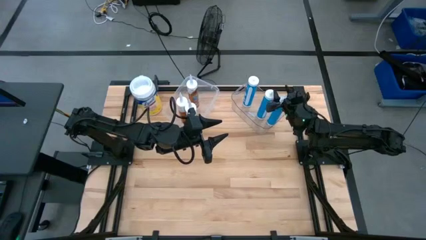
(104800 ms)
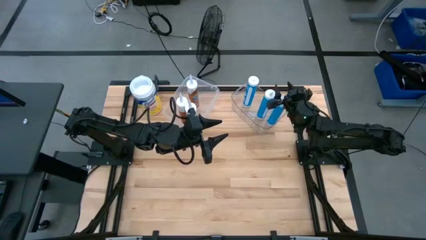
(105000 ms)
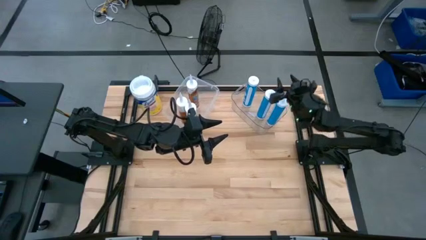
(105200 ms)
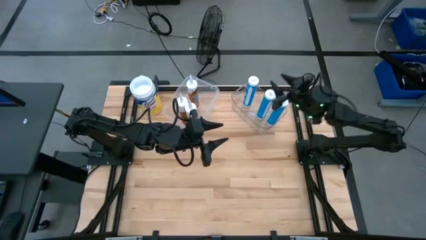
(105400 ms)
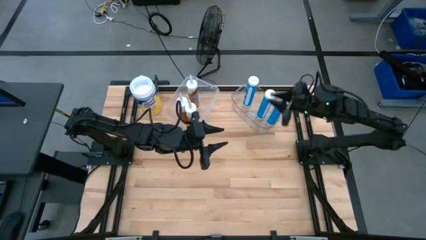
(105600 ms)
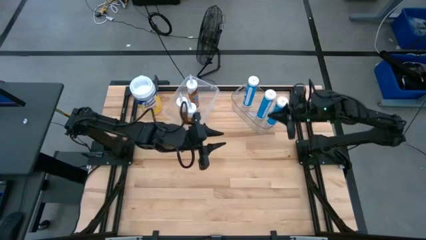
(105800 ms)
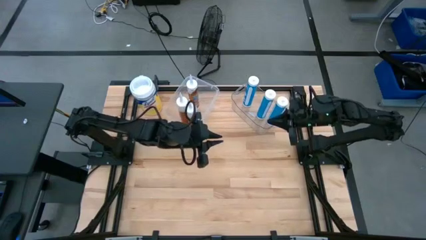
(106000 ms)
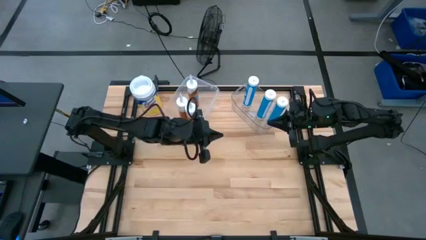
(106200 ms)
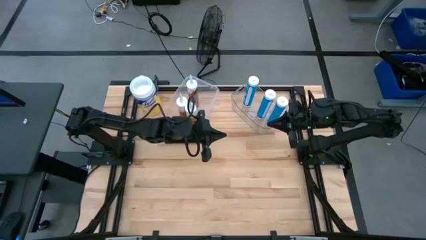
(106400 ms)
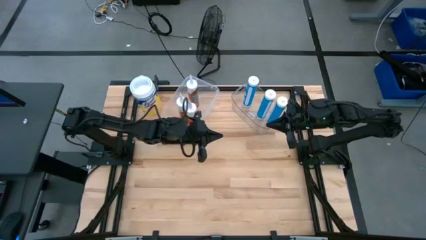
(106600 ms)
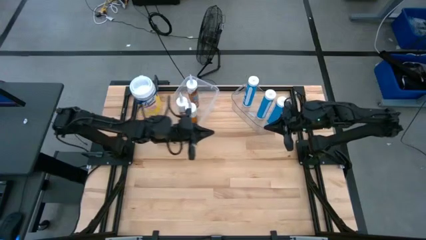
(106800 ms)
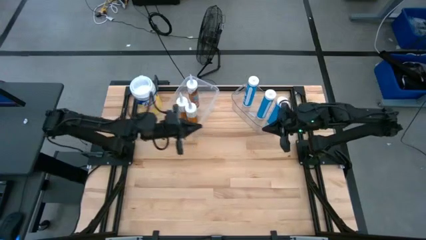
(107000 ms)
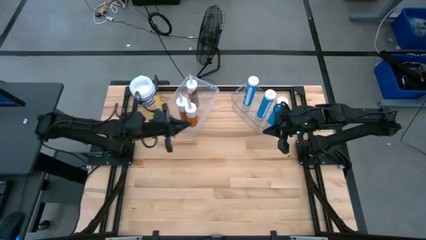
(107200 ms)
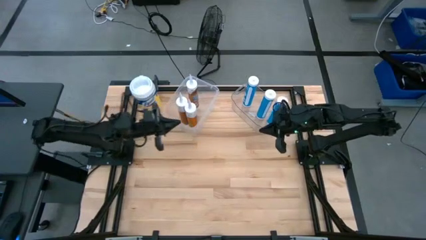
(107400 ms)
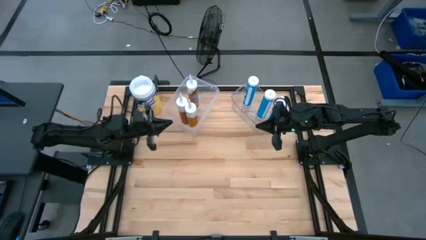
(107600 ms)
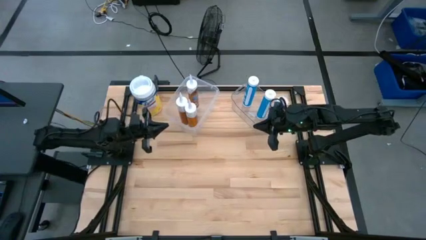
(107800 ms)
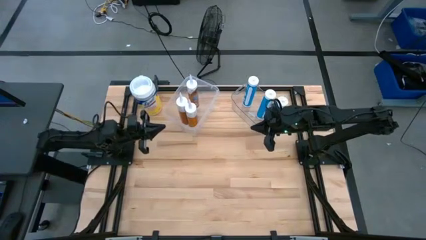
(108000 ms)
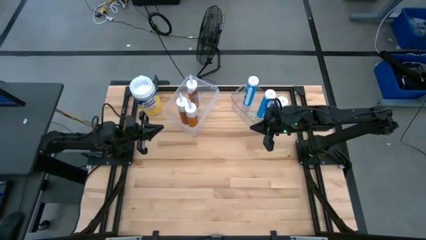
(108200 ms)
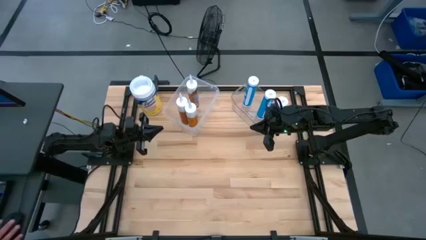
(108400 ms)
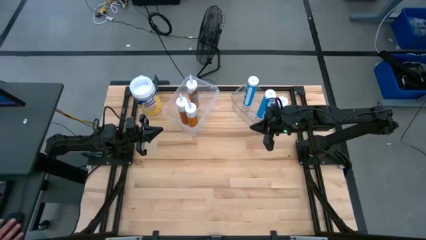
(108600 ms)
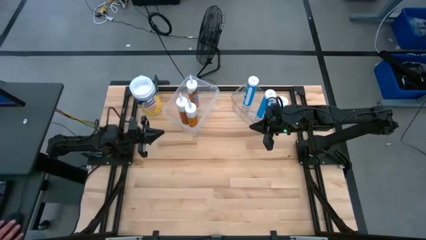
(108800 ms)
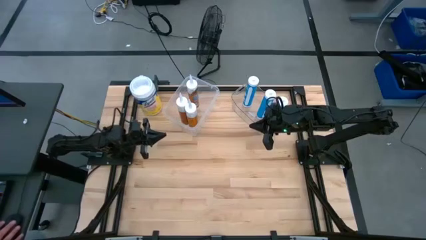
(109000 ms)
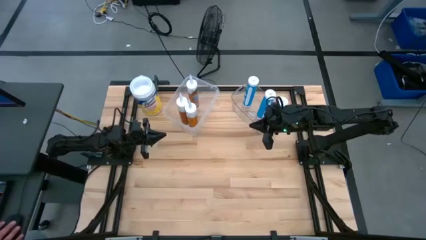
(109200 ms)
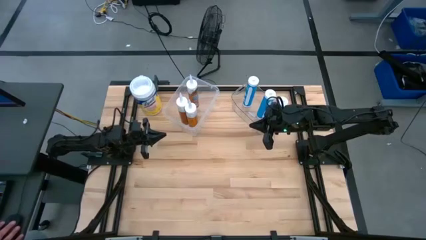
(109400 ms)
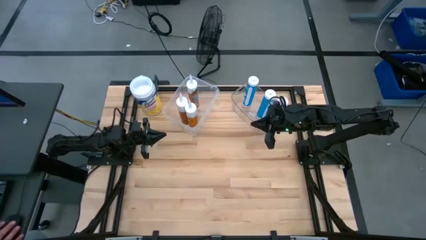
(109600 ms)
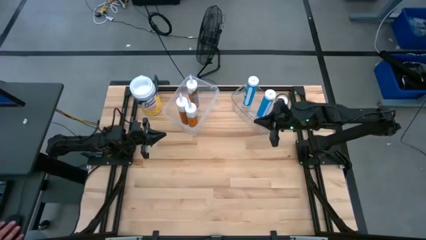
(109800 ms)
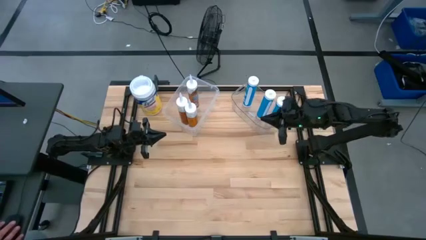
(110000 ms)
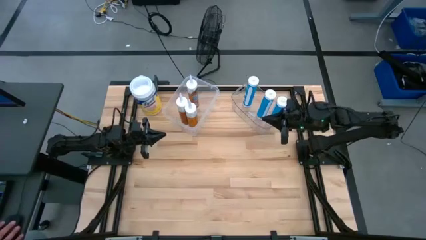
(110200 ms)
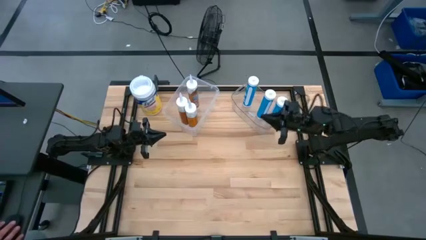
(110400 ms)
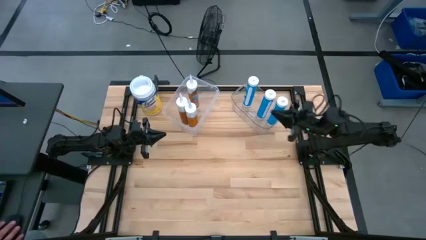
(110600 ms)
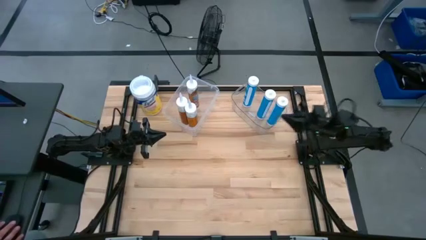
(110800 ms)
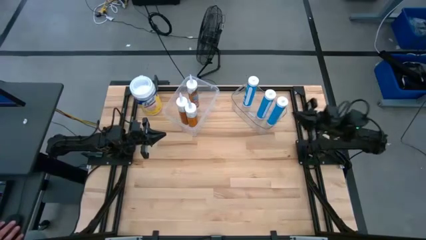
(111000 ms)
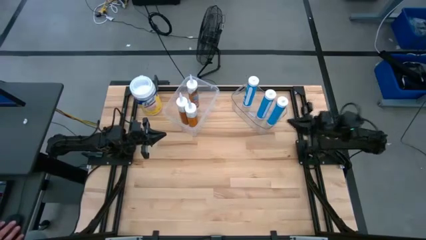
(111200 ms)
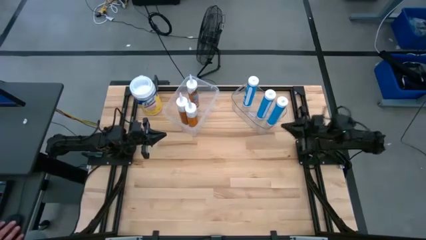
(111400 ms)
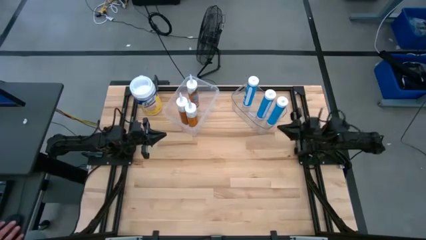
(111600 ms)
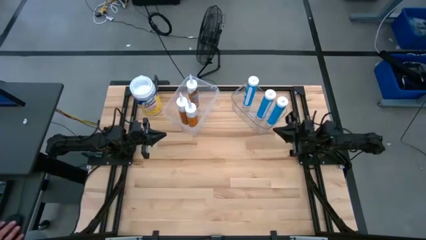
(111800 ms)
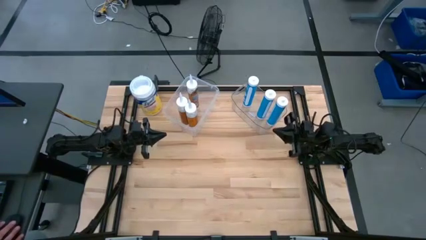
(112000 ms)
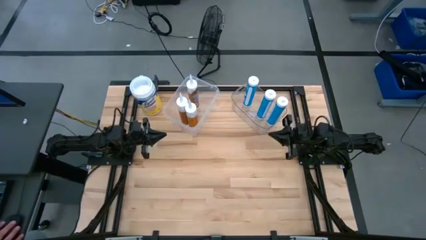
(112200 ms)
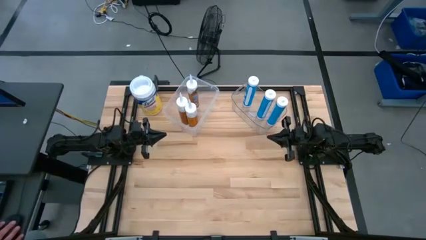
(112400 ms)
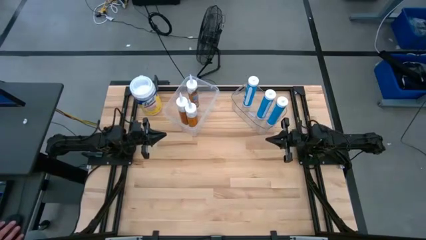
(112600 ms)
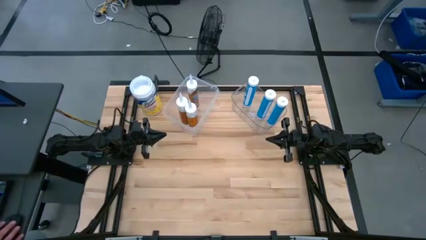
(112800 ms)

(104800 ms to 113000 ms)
Task: Pick & place silicon tubes, Sealant and Lysol wipes
Return to Home Position

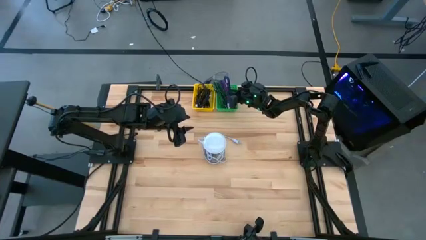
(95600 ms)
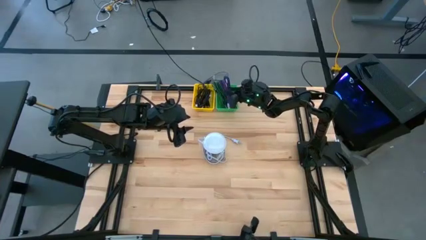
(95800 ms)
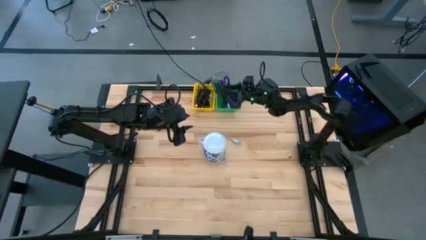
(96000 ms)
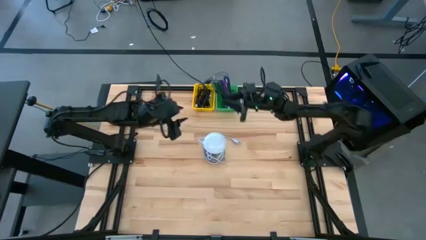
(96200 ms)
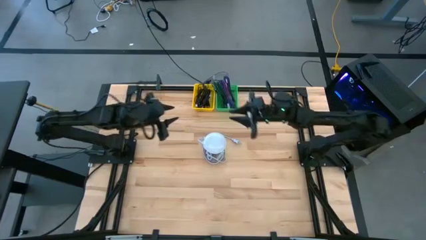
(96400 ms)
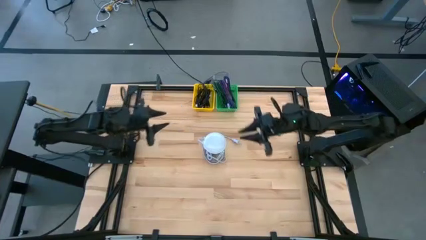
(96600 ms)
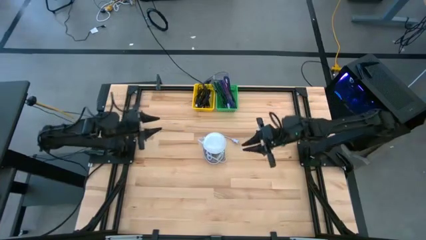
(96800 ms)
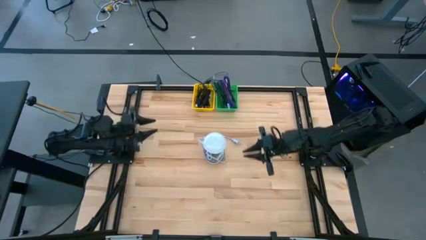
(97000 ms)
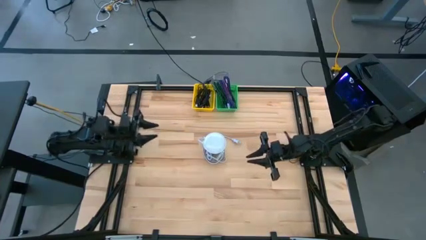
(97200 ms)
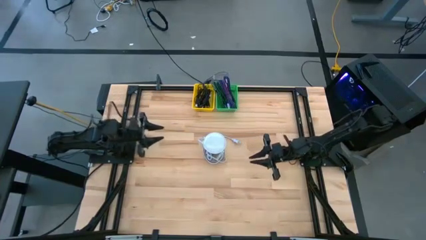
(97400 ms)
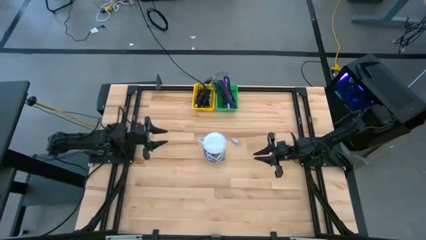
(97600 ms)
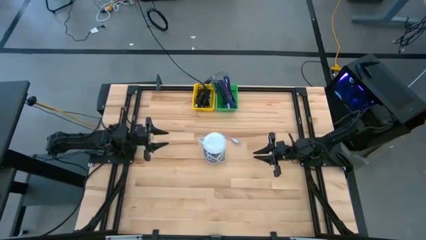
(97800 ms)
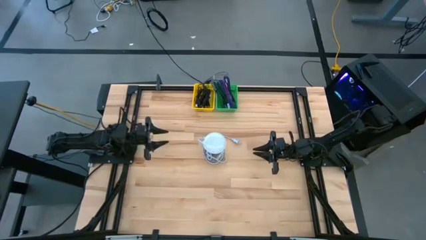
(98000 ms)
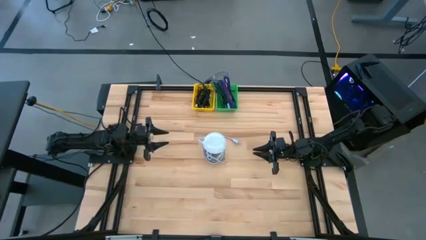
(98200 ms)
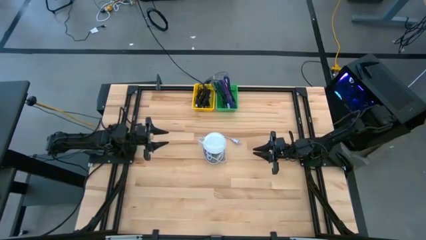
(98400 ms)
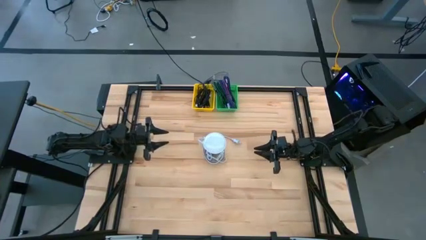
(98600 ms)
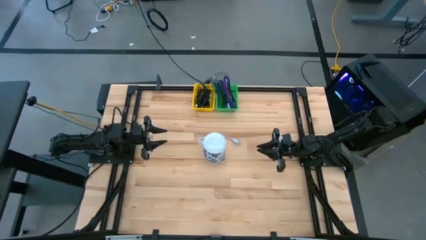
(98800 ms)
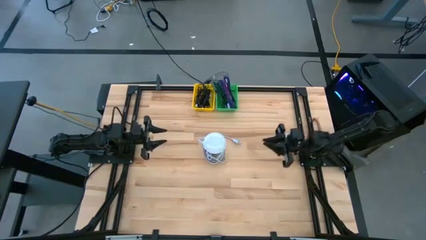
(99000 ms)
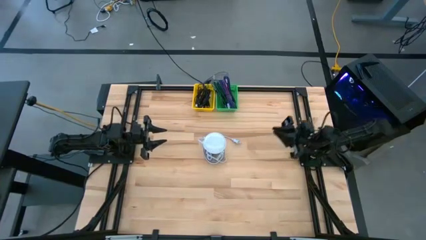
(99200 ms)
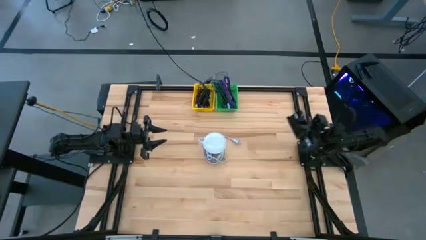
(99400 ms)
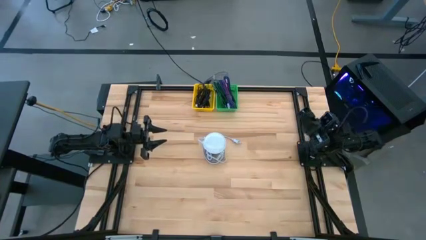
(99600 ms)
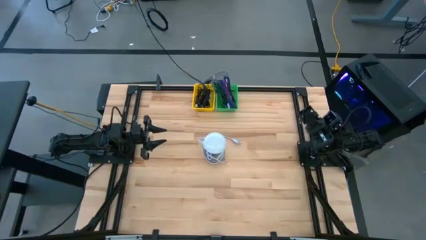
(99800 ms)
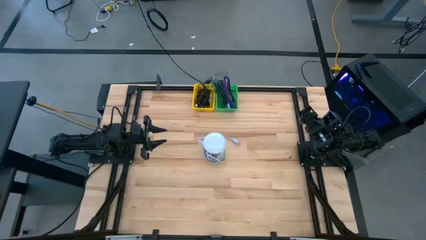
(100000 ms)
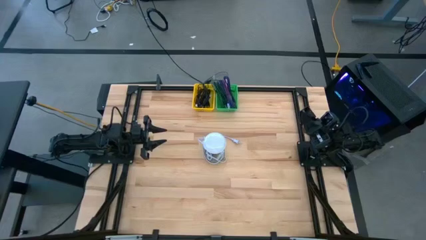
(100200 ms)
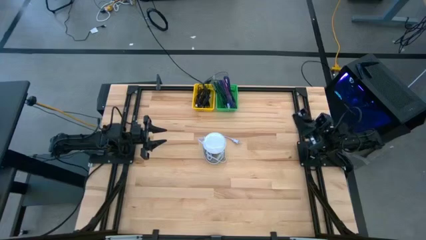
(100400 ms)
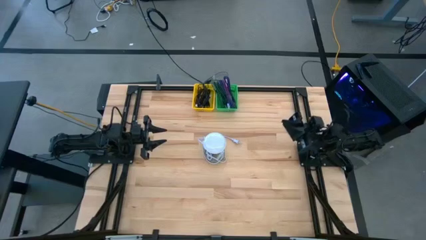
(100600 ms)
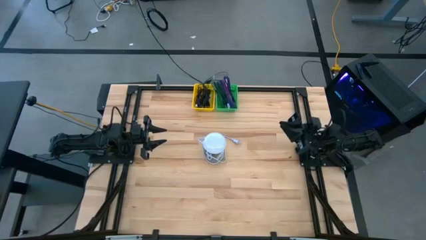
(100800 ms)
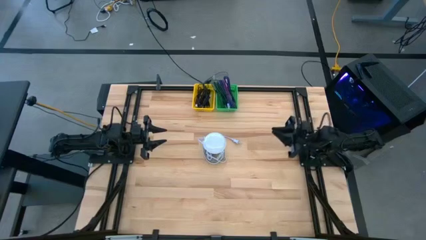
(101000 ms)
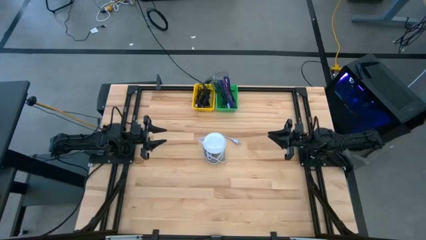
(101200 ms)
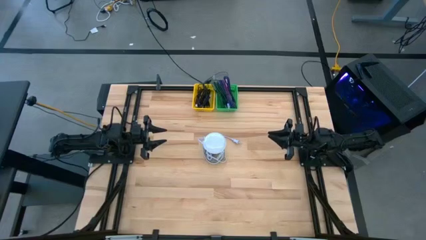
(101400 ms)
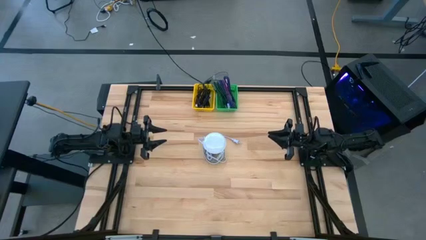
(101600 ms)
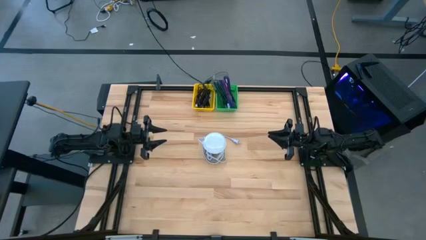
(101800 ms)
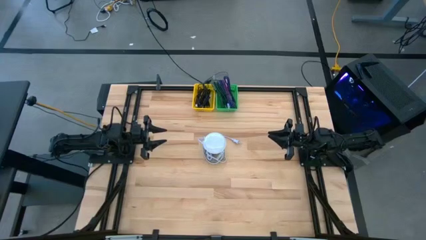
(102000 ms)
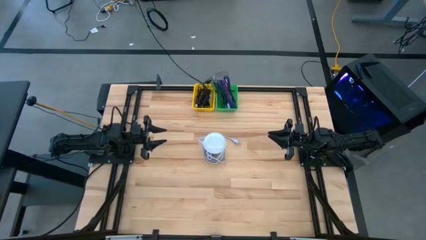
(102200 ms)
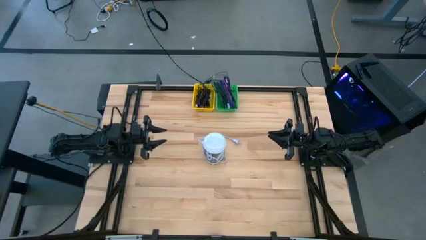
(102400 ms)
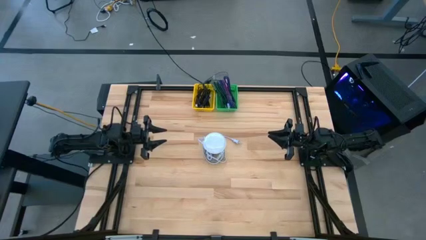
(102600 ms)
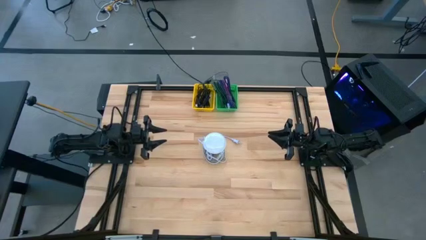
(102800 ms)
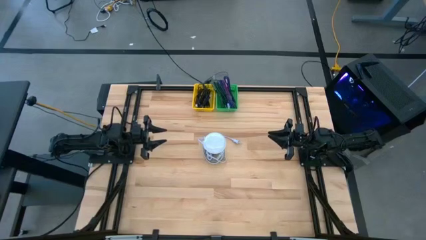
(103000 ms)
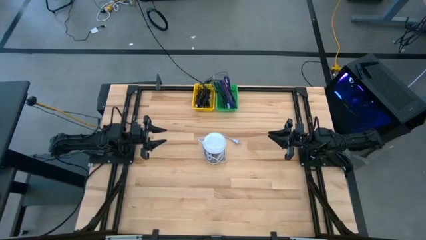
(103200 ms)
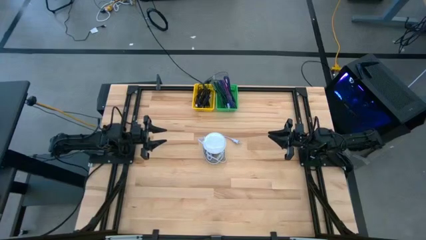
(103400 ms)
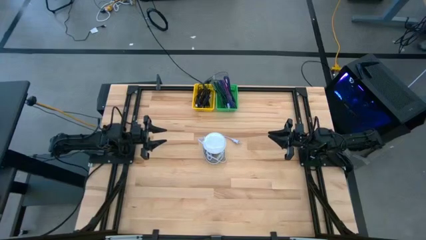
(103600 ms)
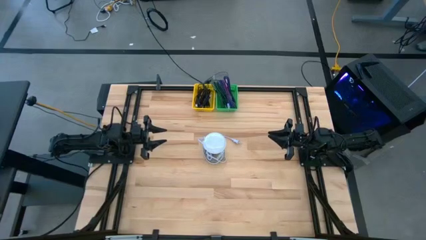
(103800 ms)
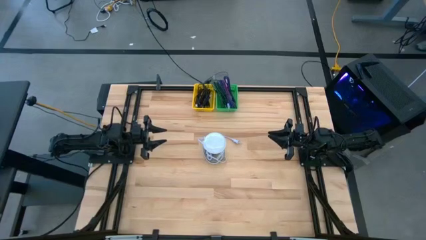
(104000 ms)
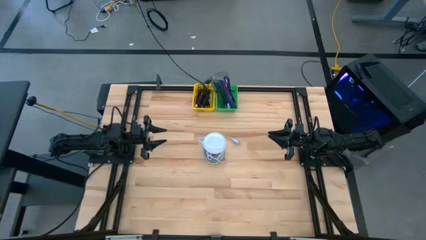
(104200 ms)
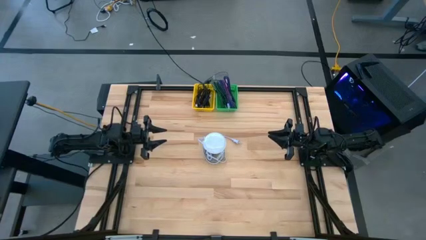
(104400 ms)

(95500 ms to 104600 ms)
Task: Pick & Place USB Port
Return to Home Position
